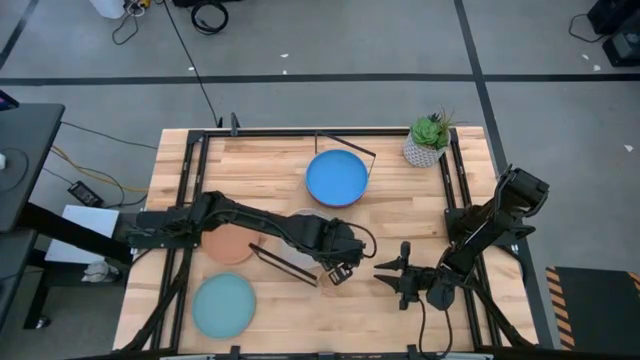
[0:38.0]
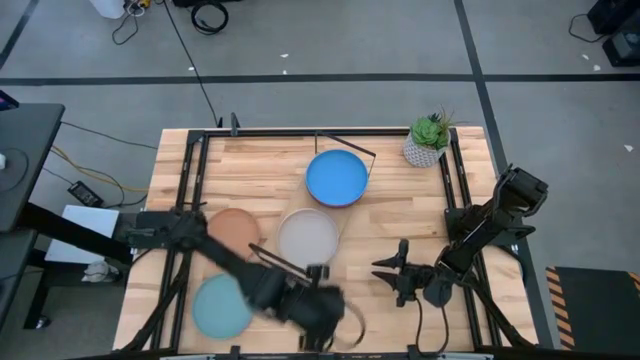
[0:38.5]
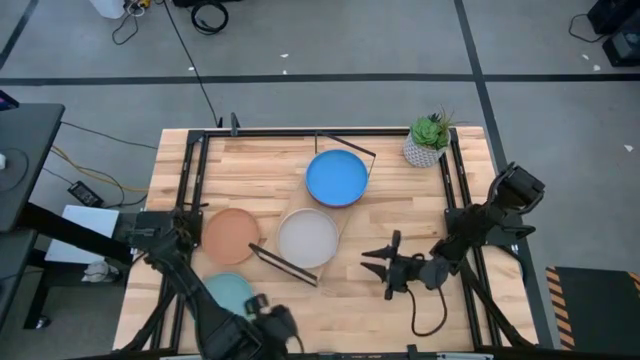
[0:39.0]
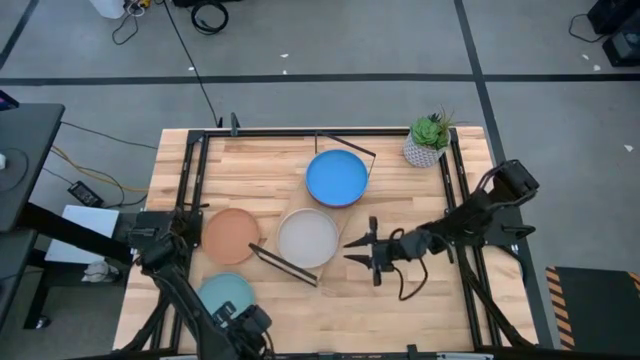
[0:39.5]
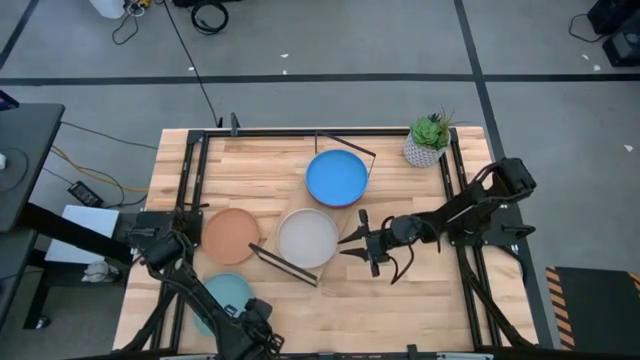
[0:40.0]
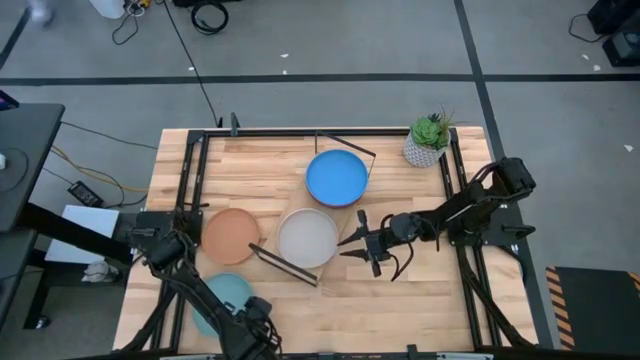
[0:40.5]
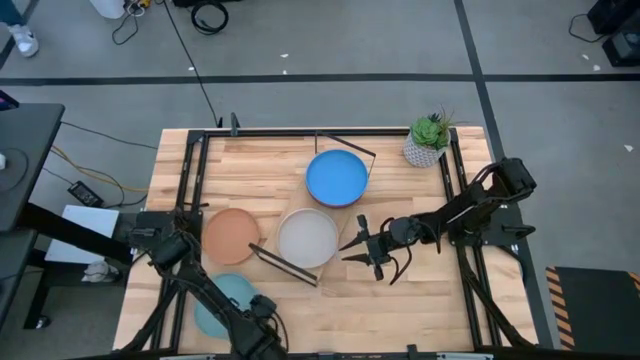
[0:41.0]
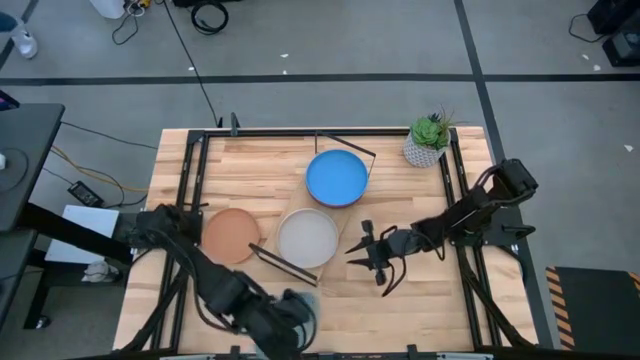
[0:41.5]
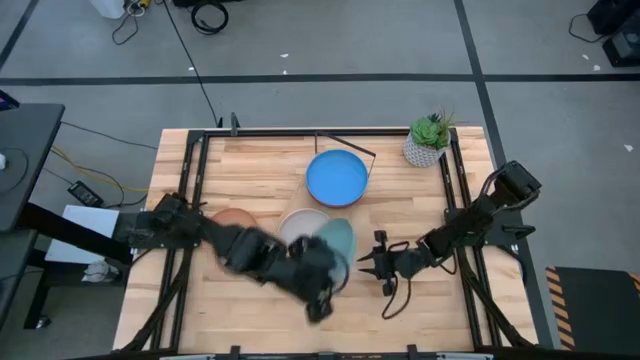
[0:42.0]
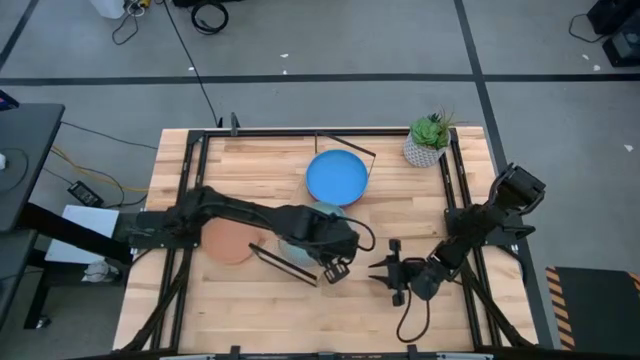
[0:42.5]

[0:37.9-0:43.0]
Task: Place and stack plates onto a shelf
Stack the light blue plate on top of the gray plate on the shelf

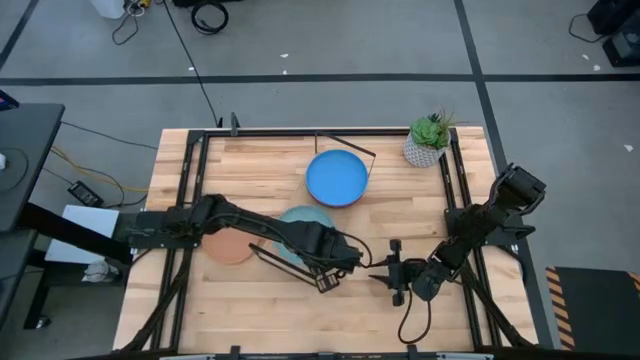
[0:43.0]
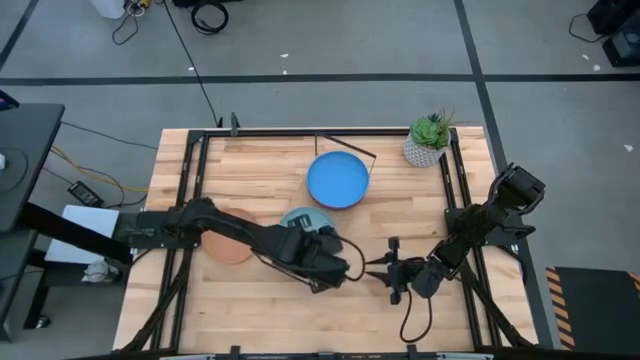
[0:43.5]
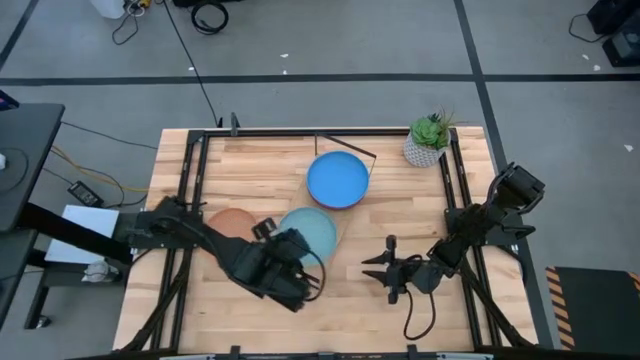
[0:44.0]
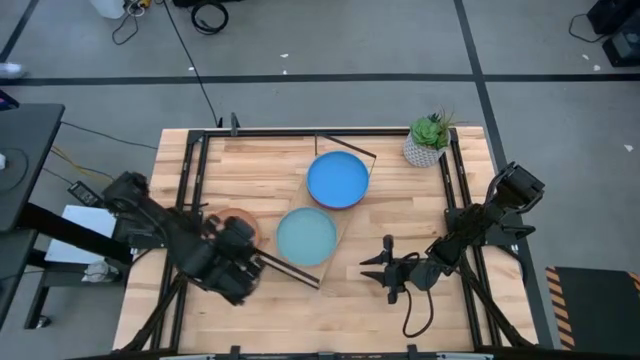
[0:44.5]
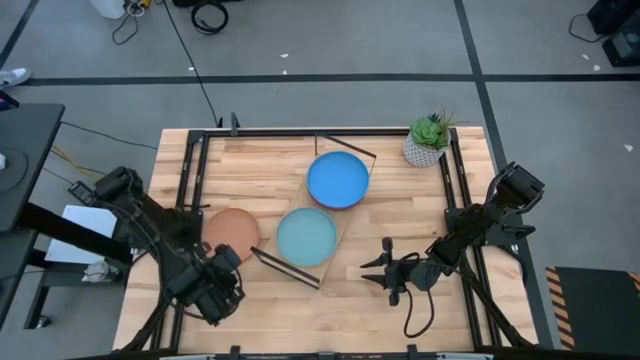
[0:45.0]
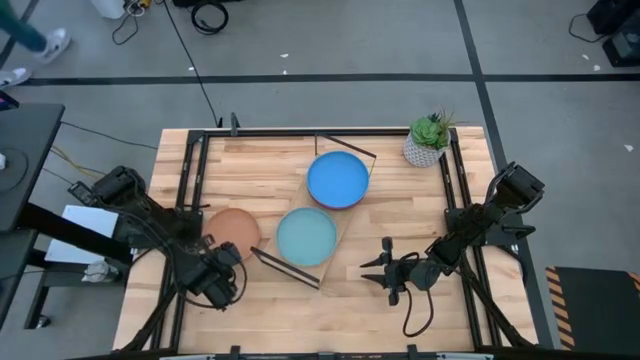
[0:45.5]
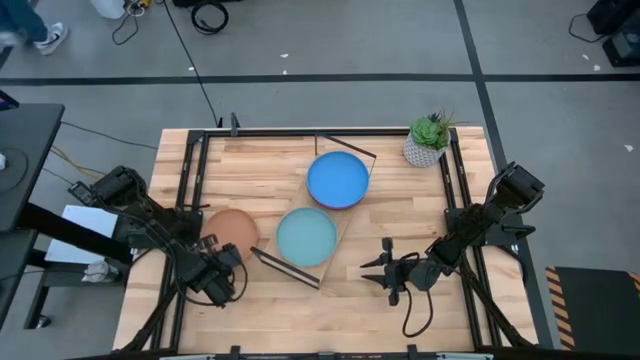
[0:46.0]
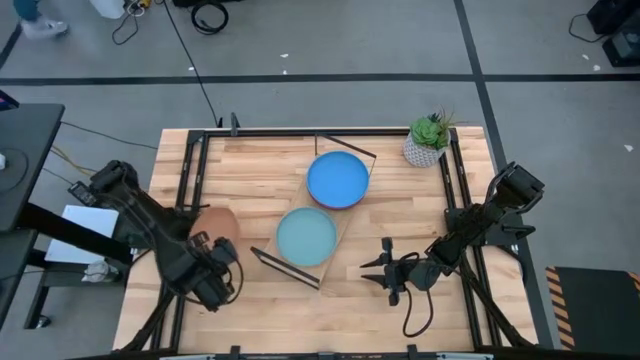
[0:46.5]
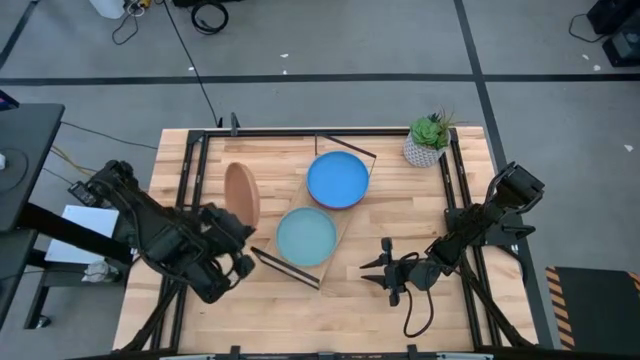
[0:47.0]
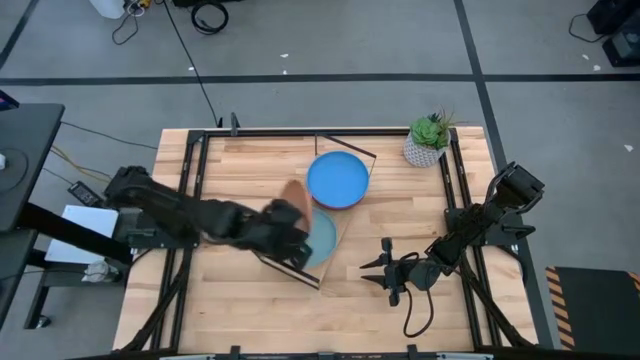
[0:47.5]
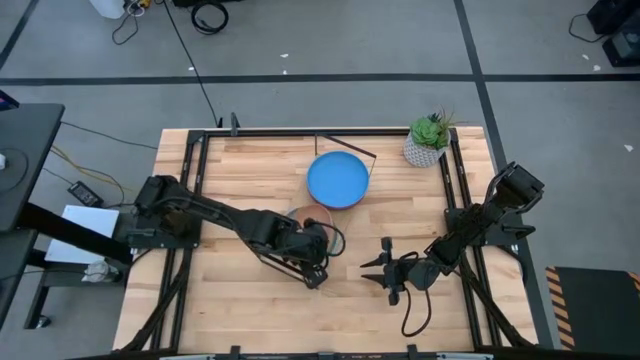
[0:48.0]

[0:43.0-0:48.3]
Stack the light brown plate on top of the light blue plate on the shelf

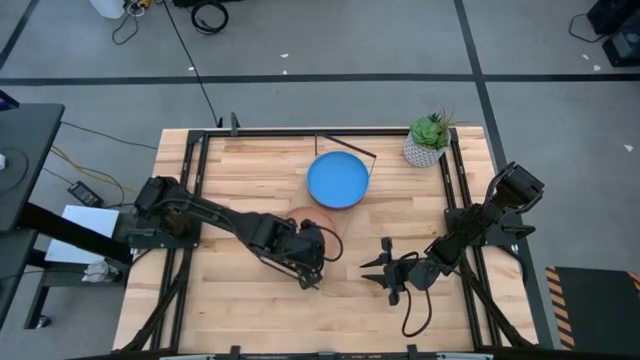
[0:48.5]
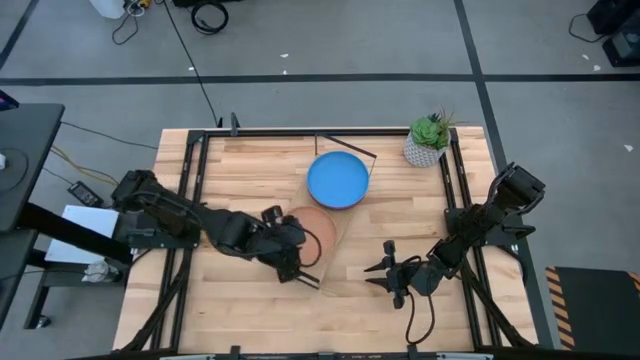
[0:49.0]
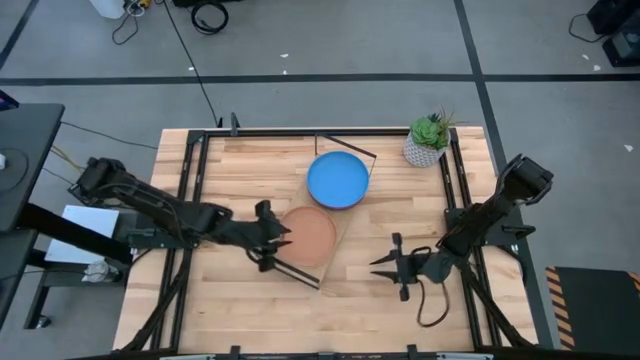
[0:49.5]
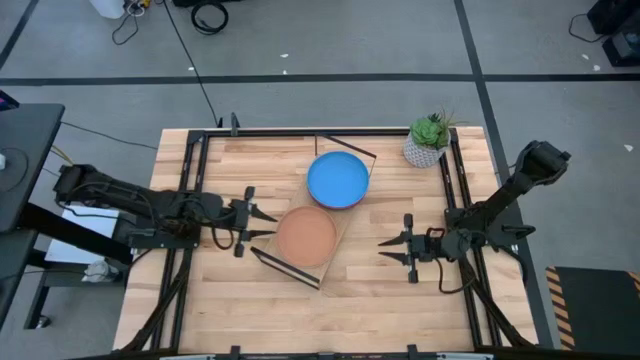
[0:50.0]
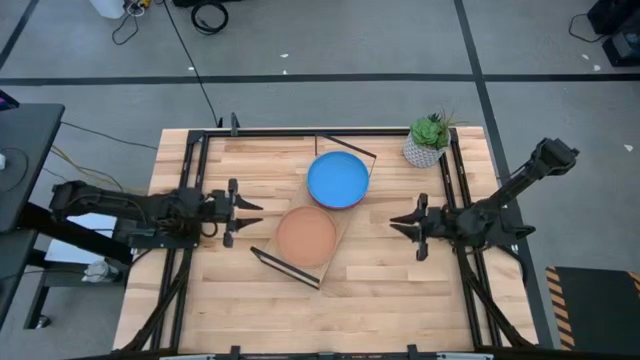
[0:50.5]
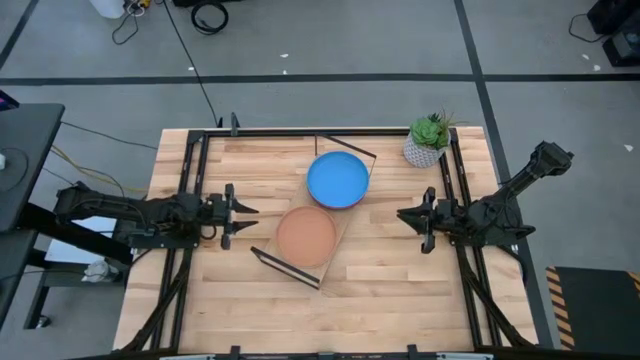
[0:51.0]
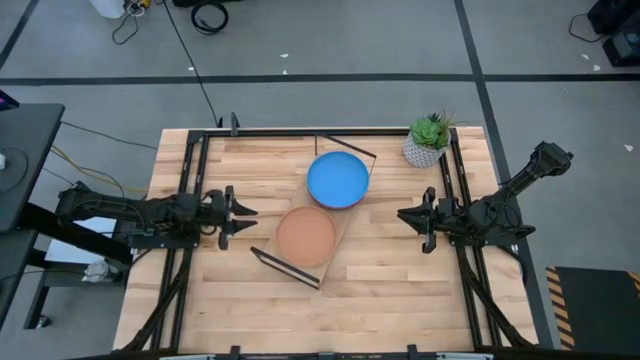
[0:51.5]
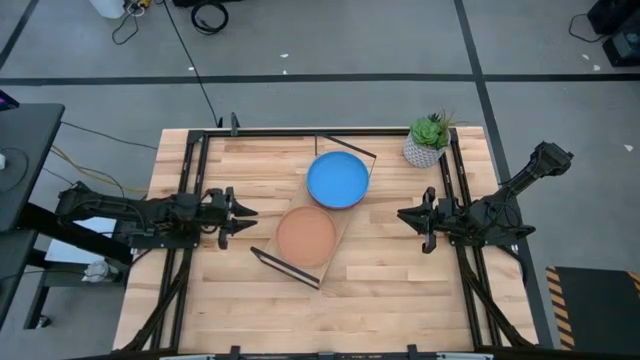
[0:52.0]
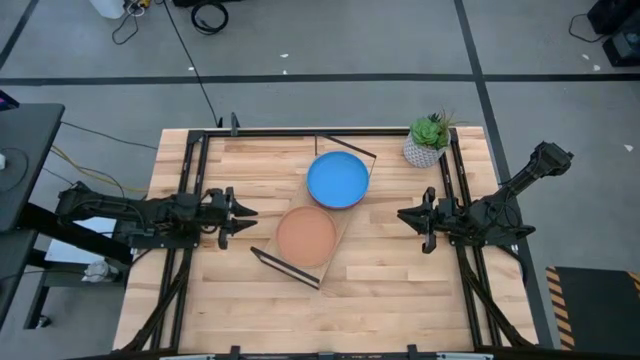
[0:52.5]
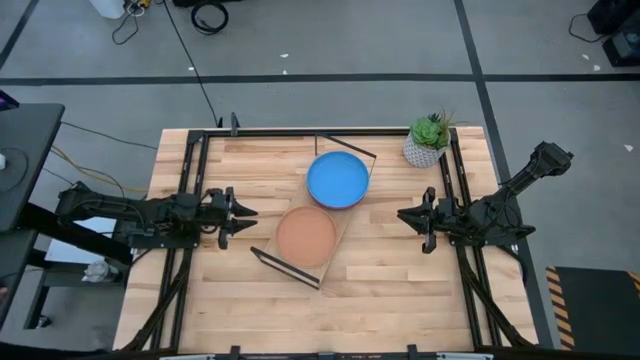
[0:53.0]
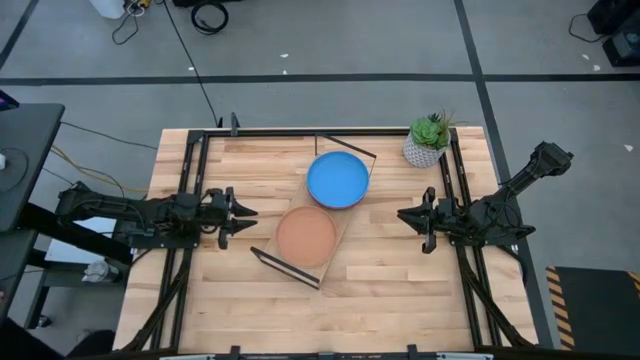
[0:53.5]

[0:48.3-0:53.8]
Return to Home Position

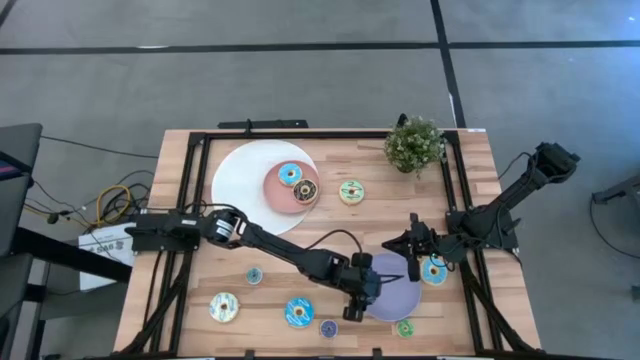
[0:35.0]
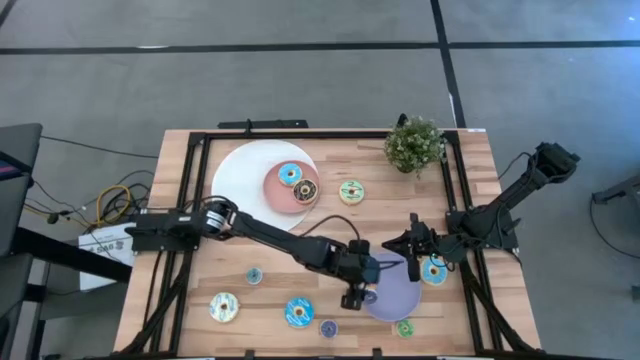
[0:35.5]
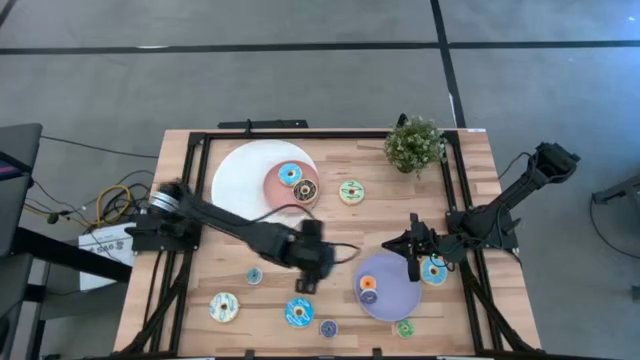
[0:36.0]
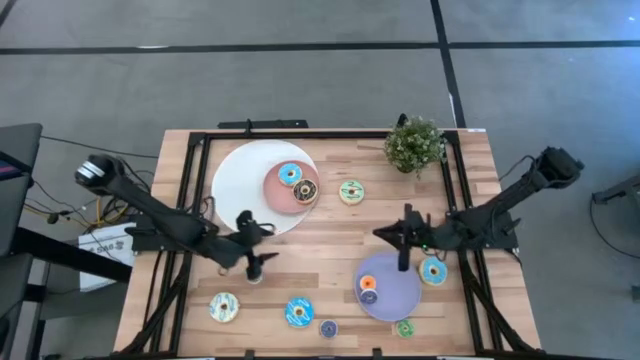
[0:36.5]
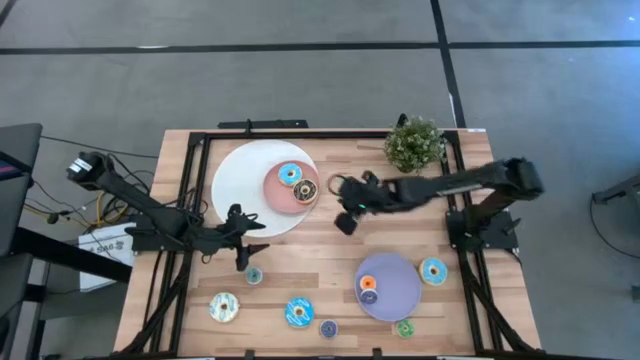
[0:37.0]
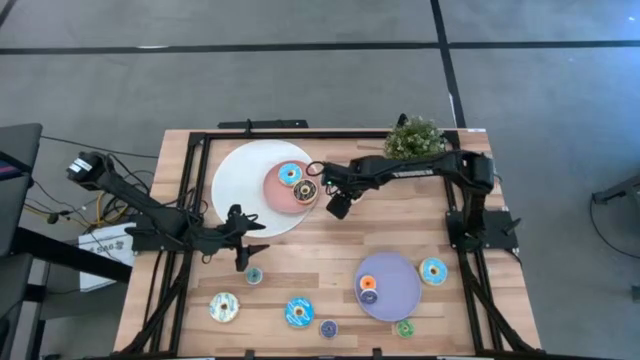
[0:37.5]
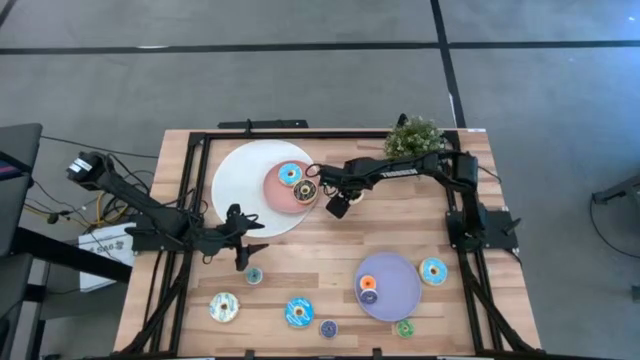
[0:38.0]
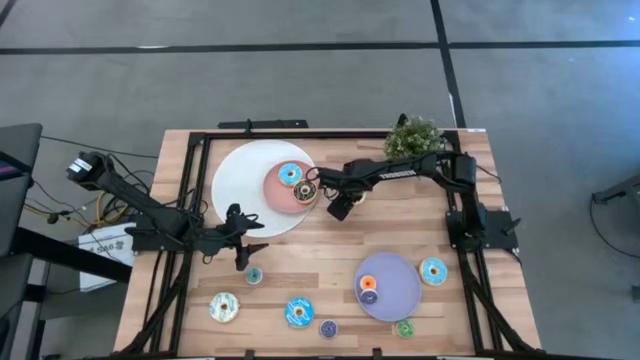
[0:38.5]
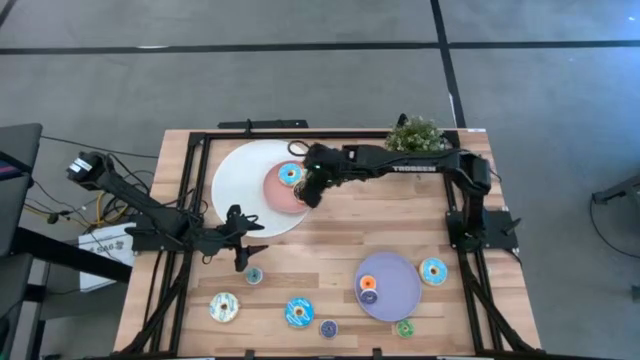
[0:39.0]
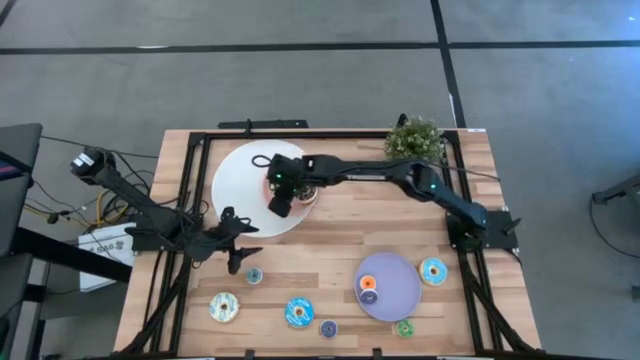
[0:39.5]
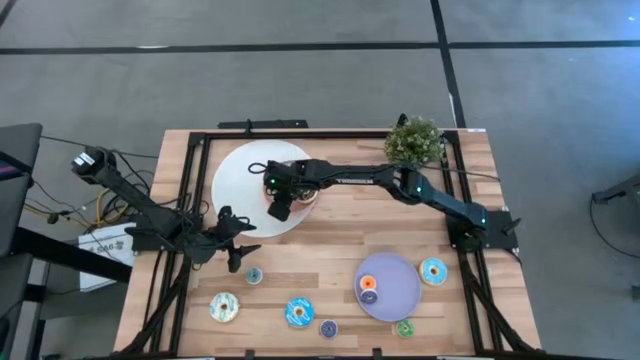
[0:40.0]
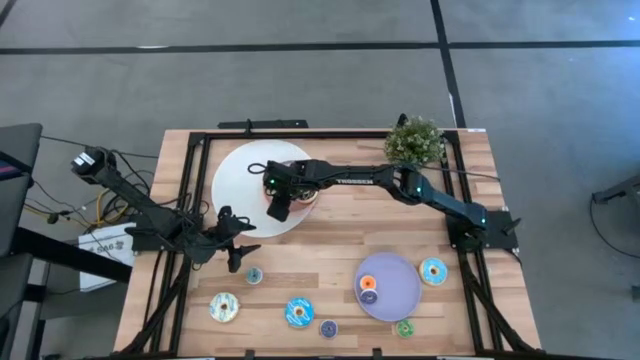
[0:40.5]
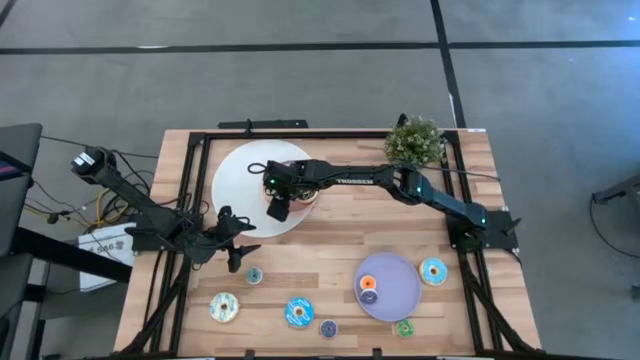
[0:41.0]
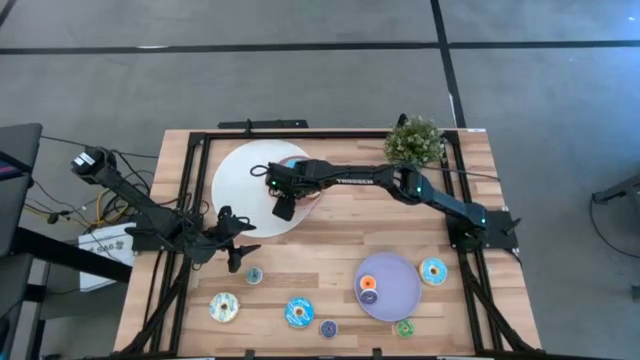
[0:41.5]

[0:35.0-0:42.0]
Task: Pick & Place donuts
Put the large light green donut on the pink plate
